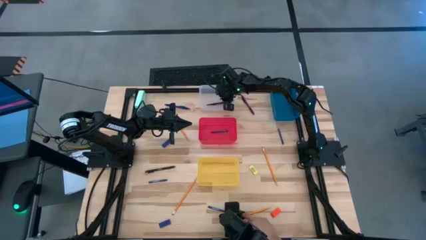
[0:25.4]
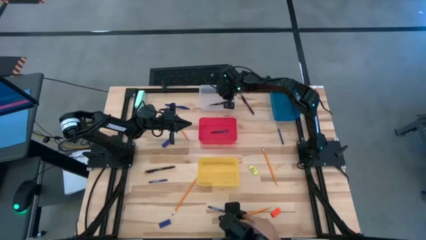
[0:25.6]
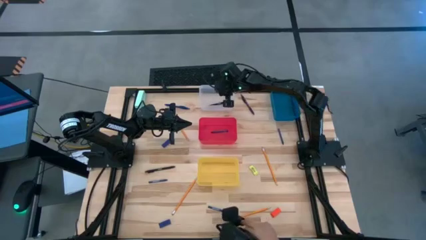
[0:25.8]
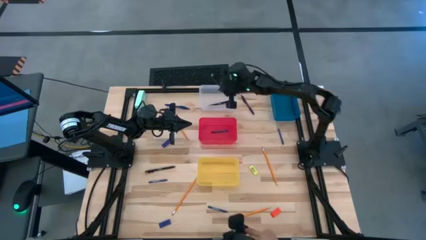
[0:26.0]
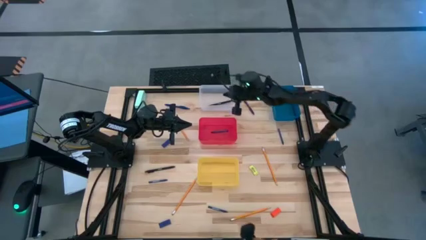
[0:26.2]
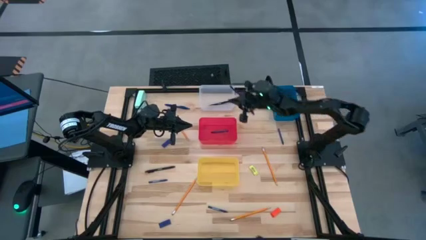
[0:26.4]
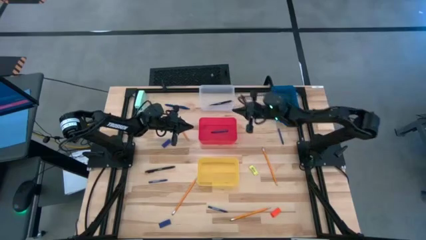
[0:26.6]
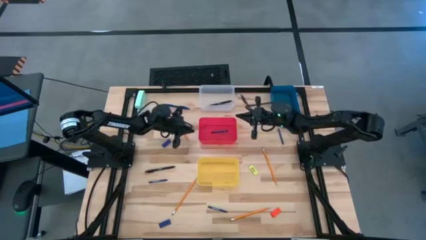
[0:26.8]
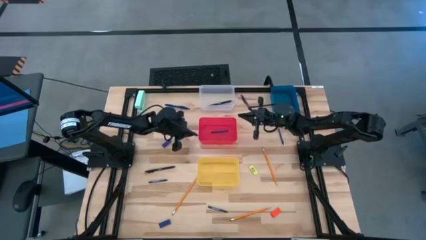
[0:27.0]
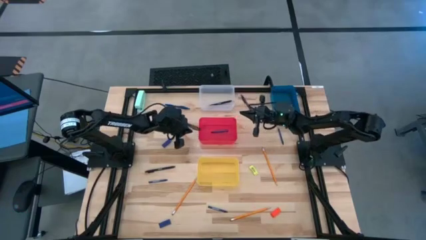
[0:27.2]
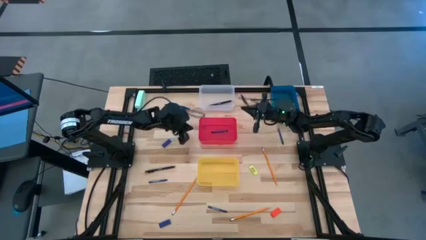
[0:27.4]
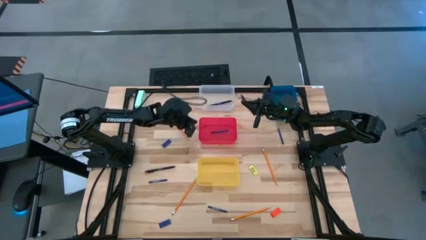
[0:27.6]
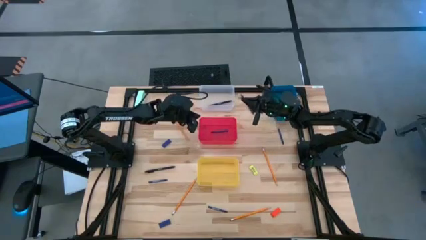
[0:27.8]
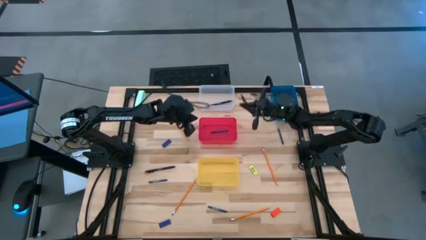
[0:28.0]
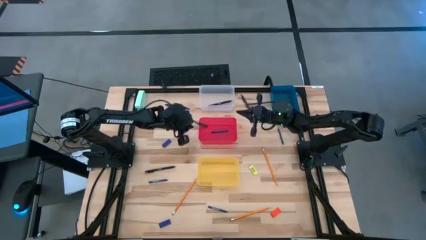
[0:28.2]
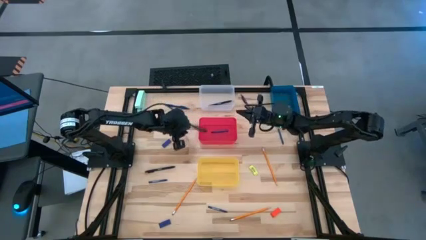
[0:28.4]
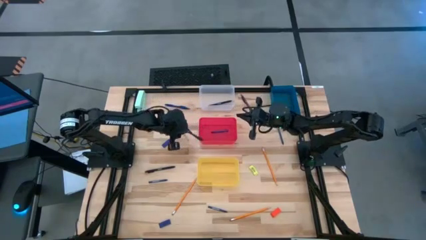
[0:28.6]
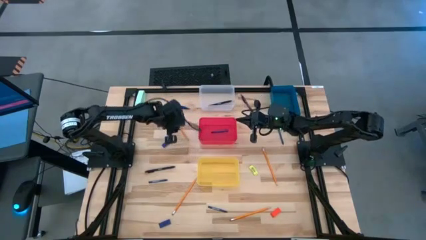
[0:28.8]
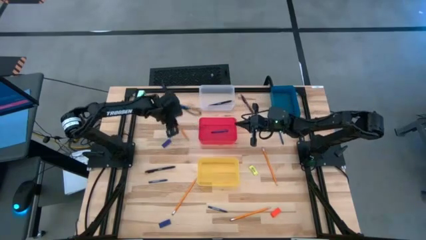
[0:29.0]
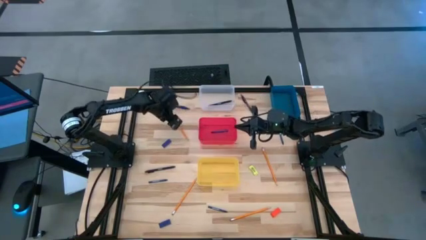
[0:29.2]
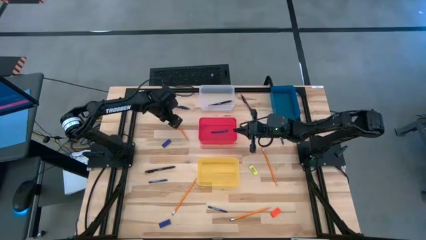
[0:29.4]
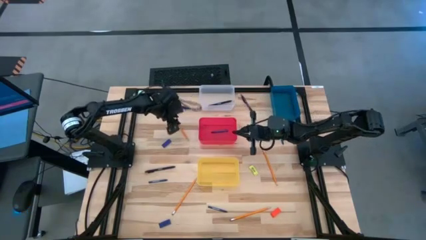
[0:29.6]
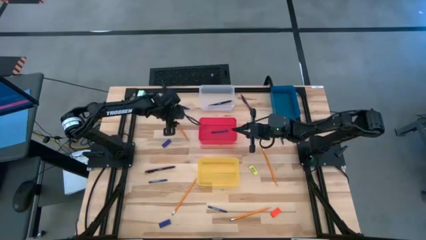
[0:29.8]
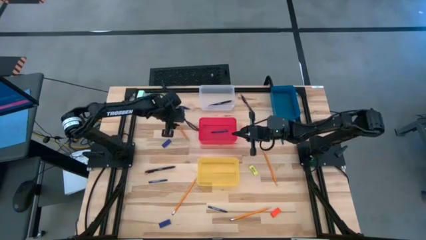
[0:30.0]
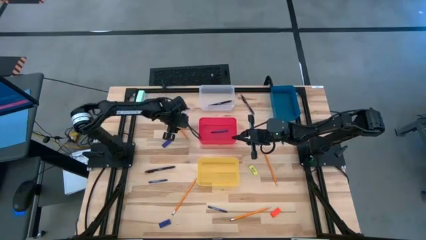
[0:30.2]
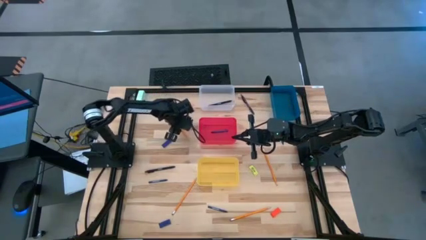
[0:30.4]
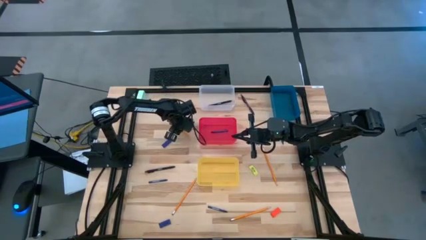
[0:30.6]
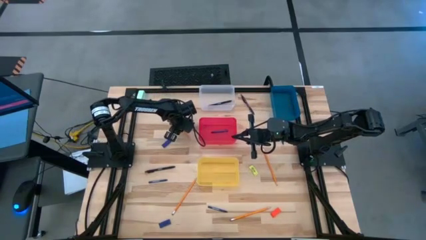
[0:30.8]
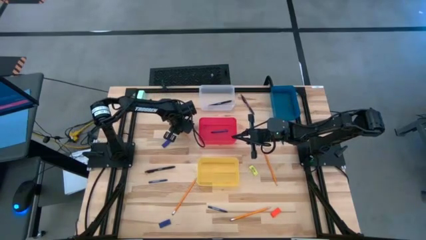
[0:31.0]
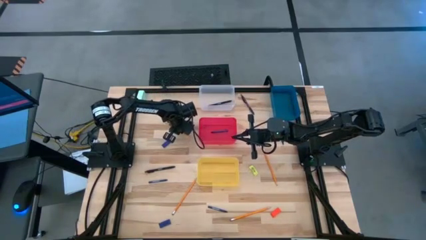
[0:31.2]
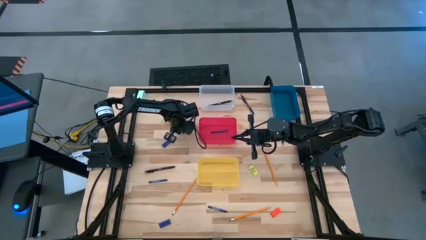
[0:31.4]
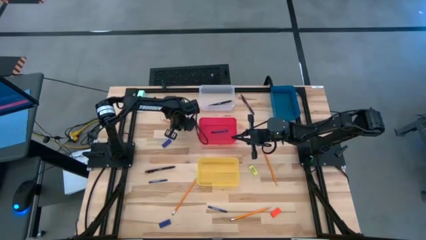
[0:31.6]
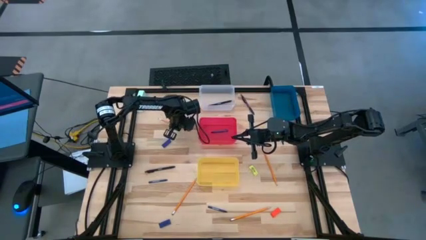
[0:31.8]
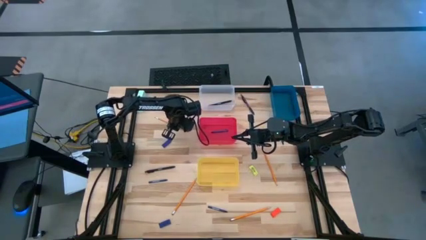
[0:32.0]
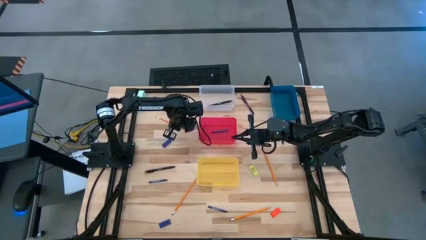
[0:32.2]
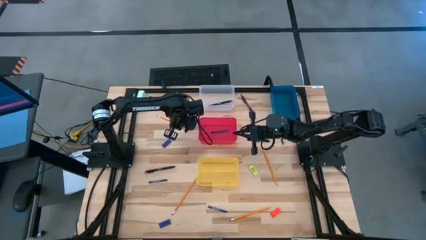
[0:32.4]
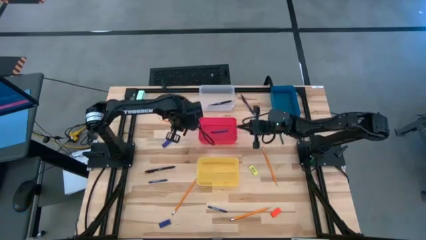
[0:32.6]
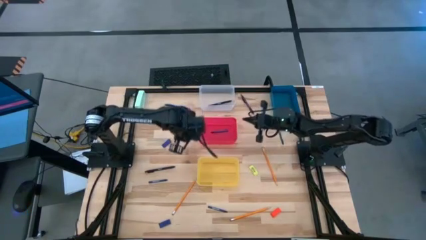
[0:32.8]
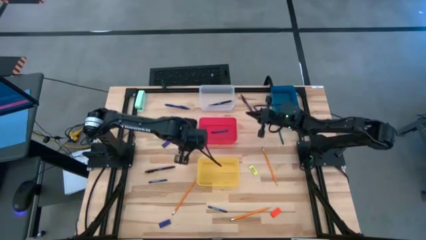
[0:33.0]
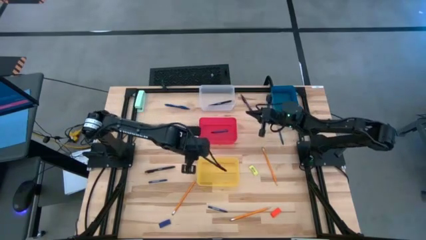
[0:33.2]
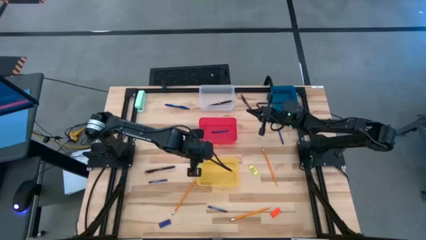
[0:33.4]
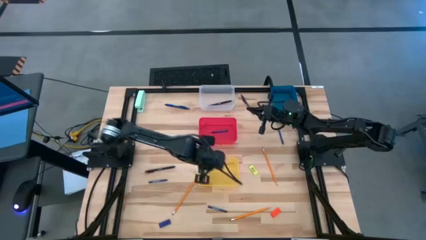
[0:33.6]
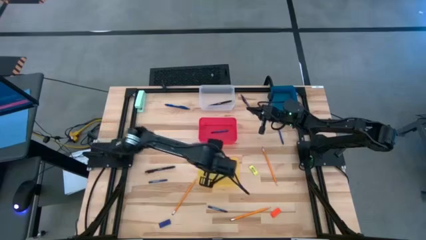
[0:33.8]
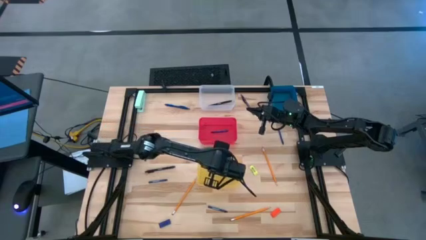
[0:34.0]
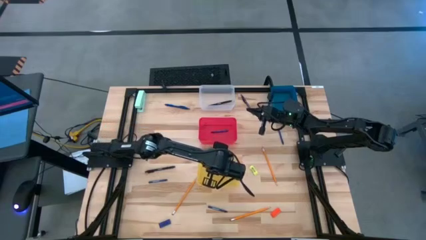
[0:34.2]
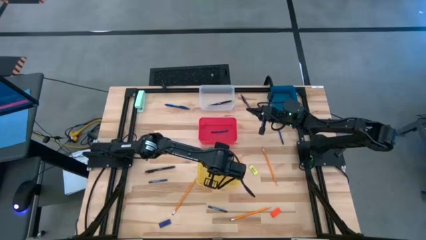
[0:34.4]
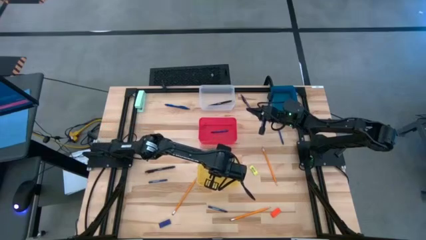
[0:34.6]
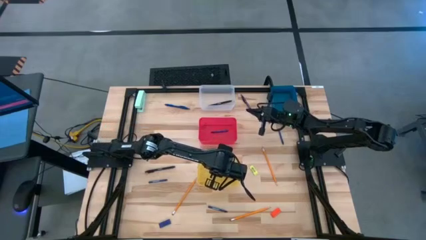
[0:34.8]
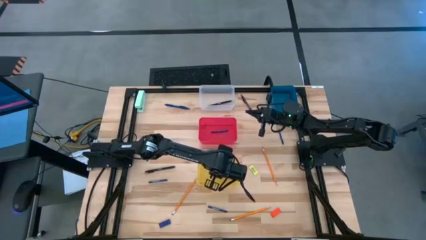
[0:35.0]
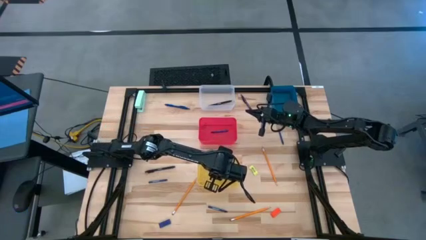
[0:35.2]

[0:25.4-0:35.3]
Task: Sort crayons/erasers/pens/pencils in bins
Put the top left orange pencil into the yellow bin

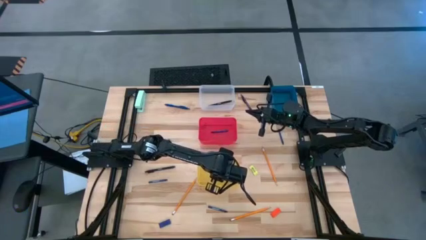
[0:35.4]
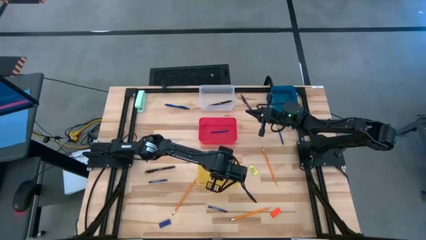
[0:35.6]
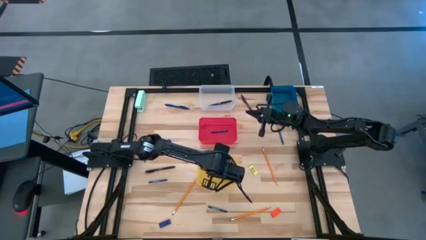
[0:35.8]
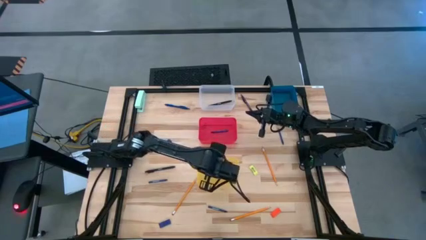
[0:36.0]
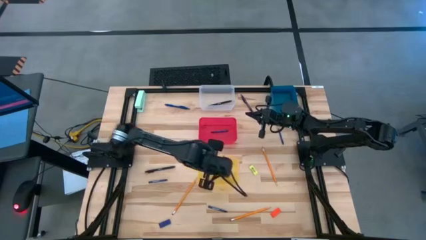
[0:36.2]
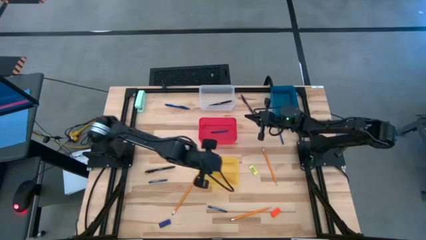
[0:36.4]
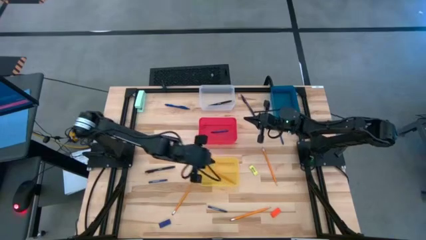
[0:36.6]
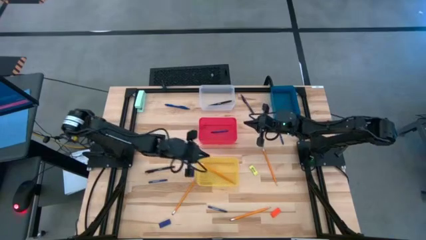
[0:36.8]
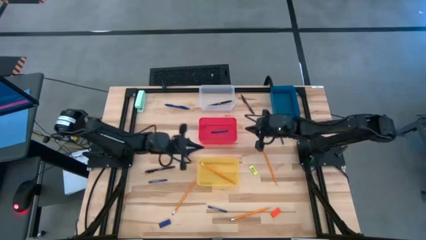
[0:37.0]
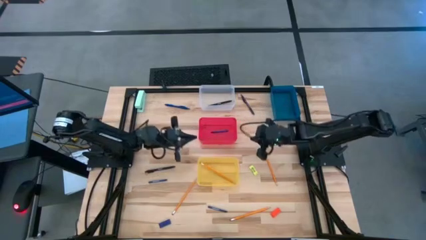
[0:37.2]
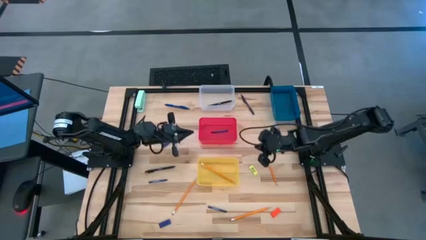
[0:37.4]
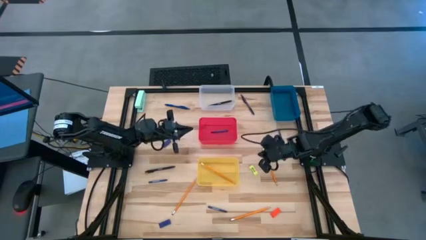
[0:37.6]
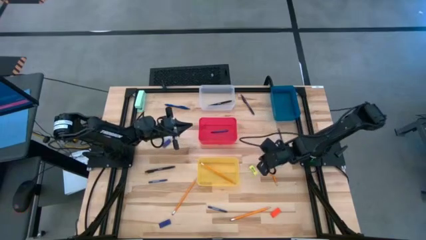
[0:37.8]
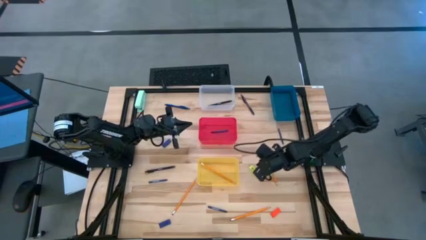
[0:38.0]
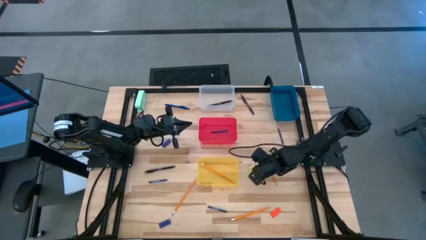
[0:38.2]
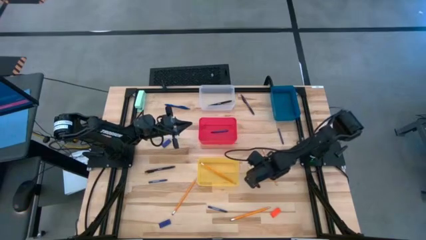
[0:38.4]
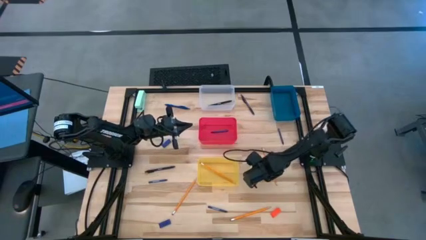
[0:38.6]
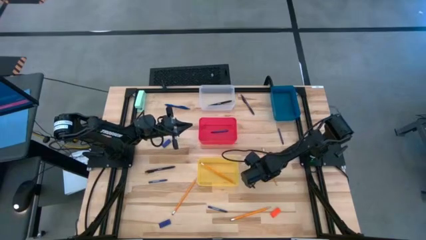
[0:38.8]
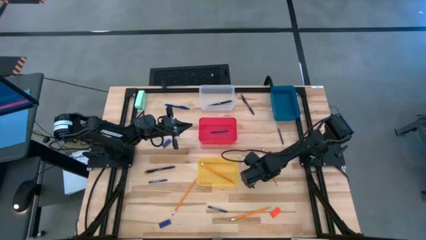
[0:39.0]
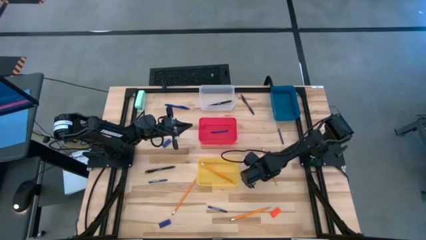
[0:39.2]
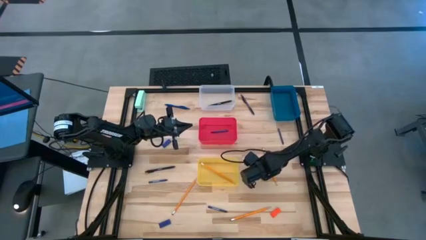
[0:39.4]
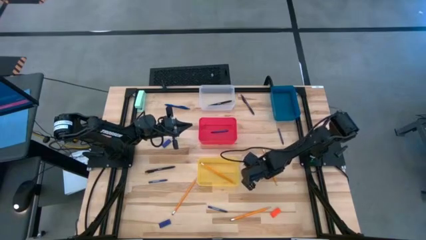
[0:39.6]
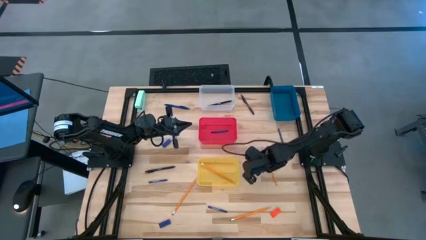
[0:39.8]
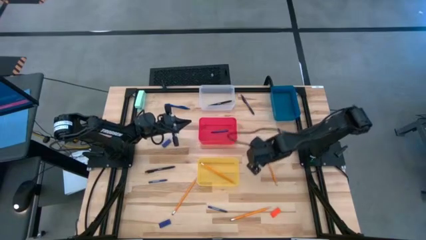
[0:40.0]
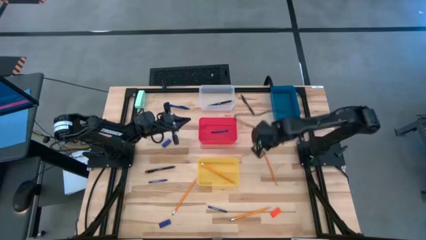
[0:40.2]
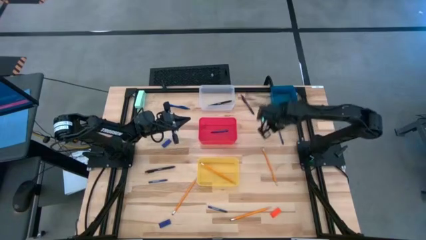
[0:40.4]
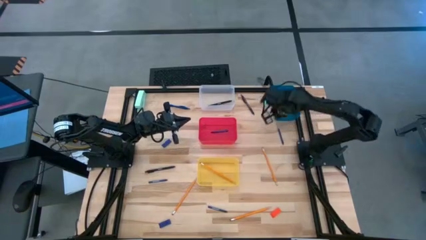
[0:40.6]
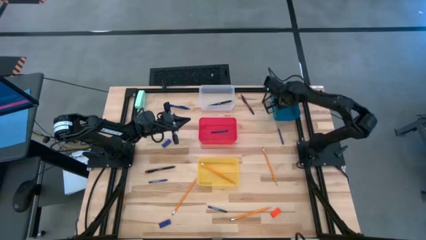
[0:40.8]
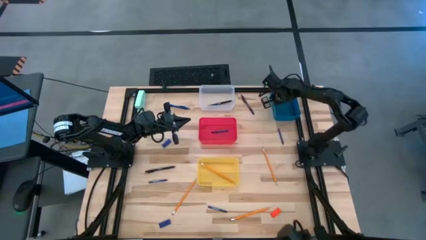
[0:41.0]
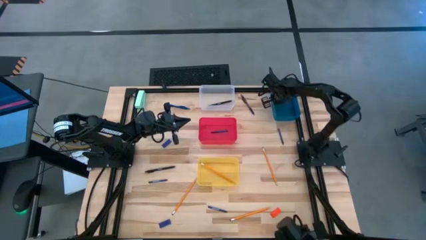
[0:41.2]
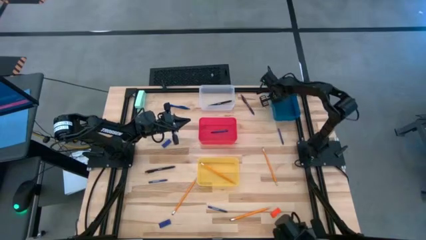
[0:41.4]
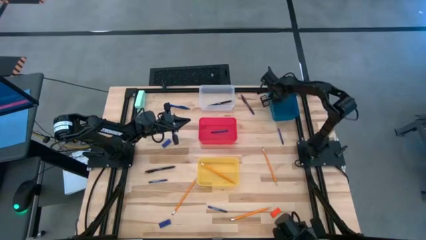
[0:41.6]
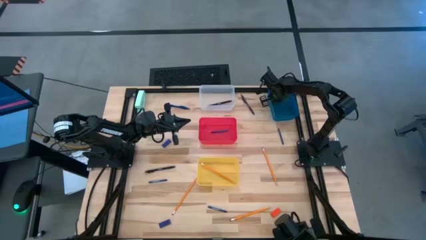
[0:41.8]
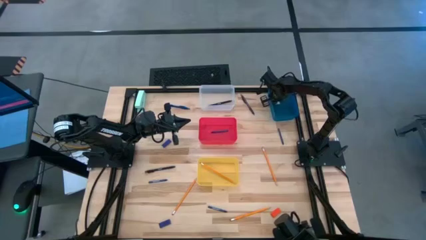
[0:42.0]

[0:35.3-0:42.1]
Put the green eraser into the blue bin
